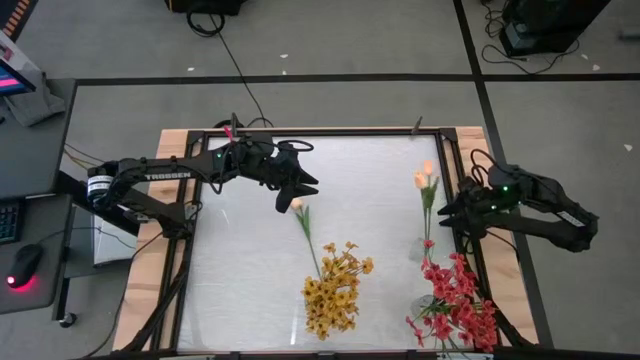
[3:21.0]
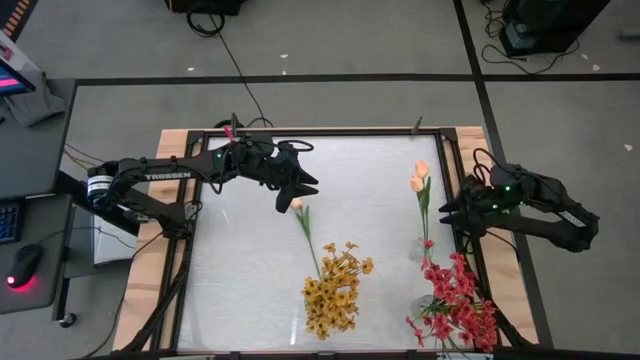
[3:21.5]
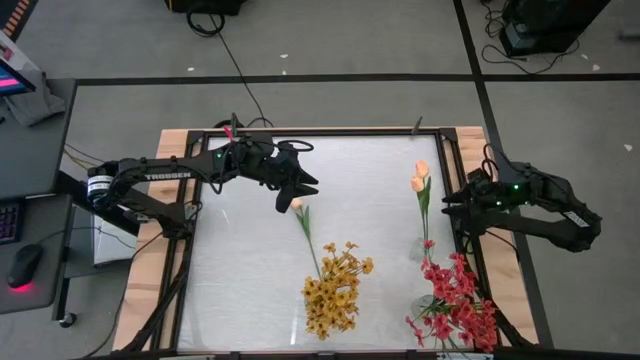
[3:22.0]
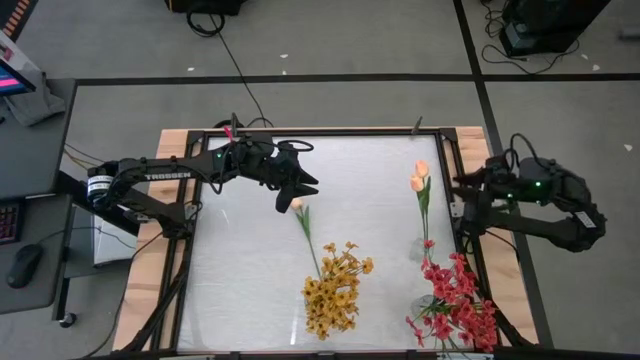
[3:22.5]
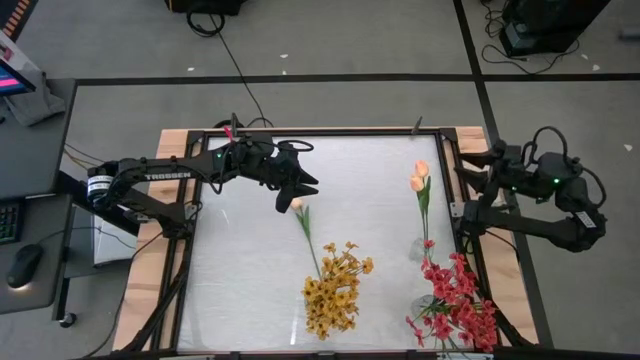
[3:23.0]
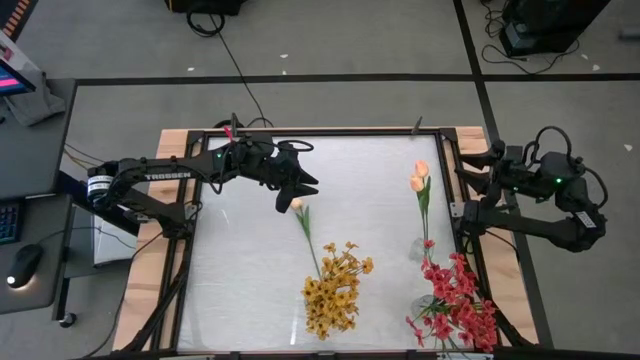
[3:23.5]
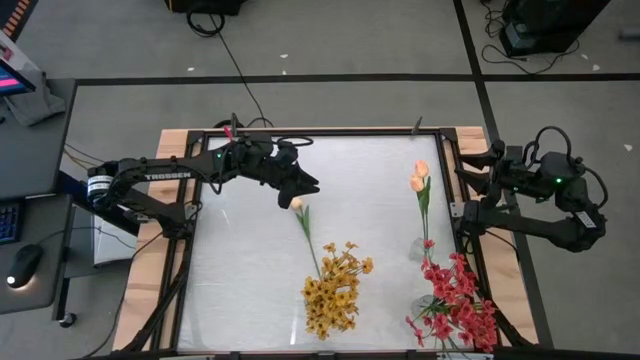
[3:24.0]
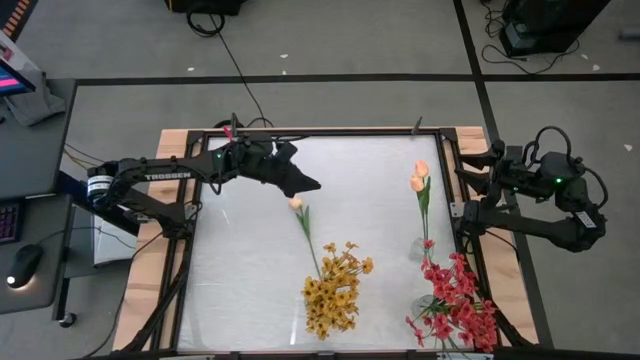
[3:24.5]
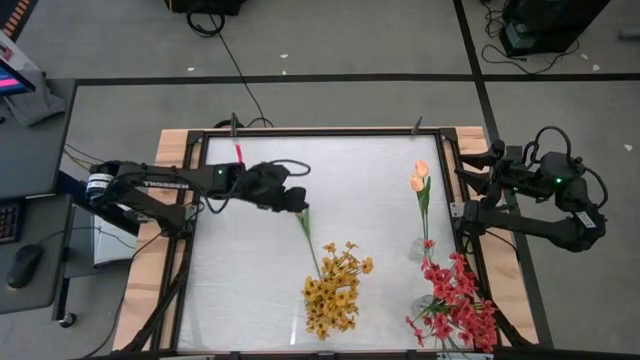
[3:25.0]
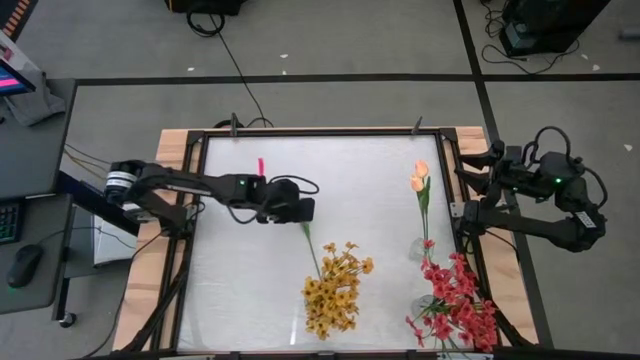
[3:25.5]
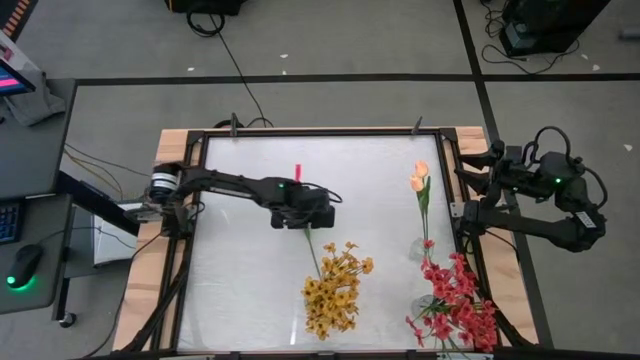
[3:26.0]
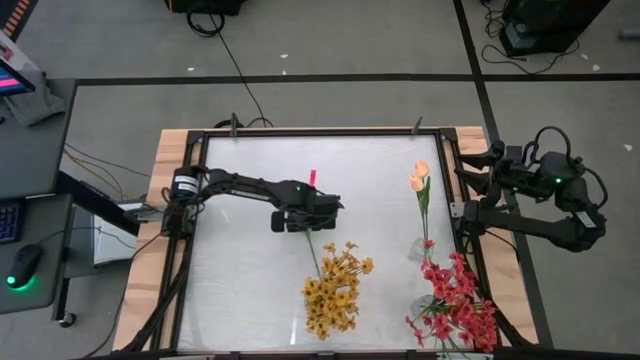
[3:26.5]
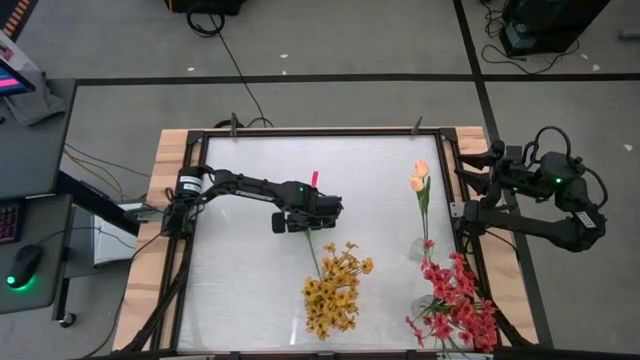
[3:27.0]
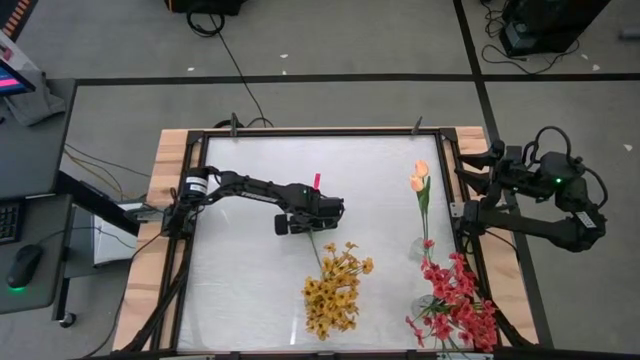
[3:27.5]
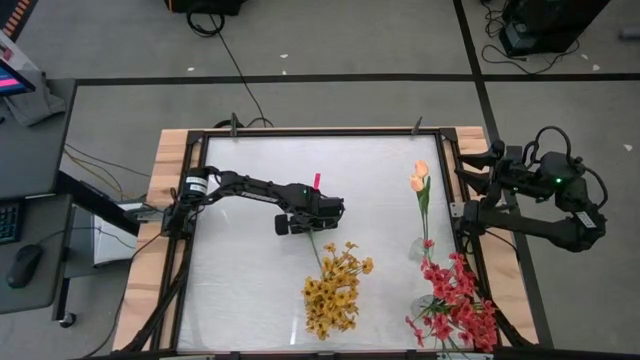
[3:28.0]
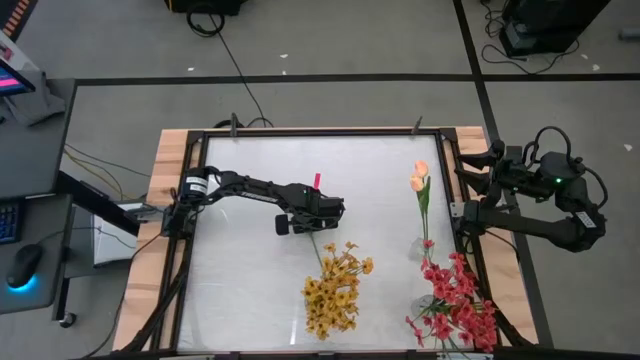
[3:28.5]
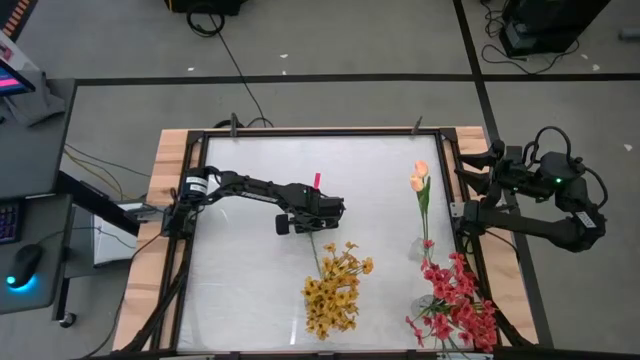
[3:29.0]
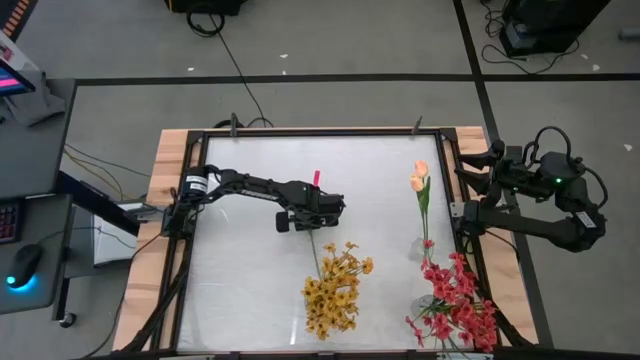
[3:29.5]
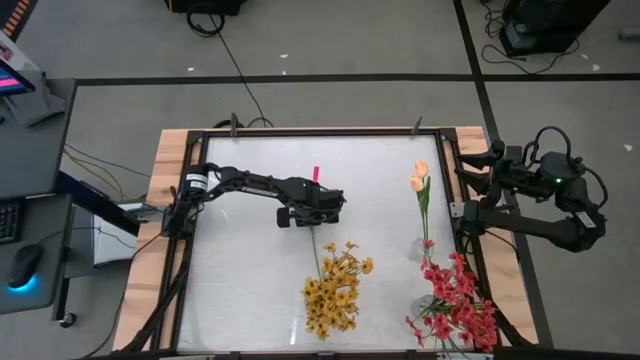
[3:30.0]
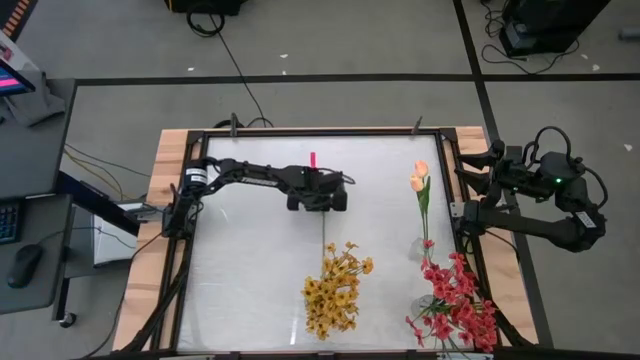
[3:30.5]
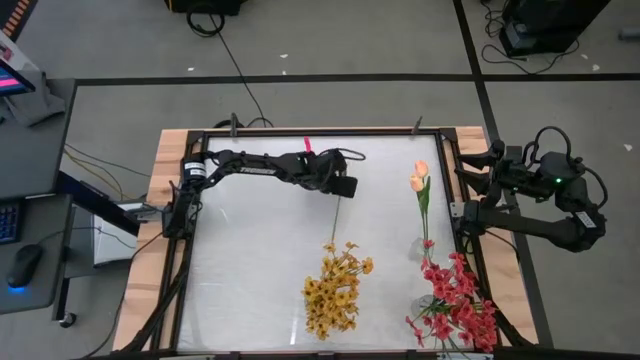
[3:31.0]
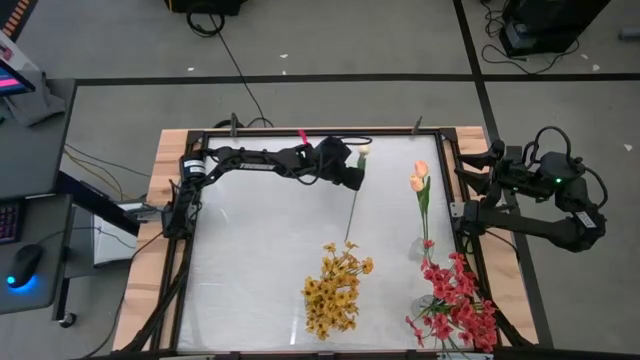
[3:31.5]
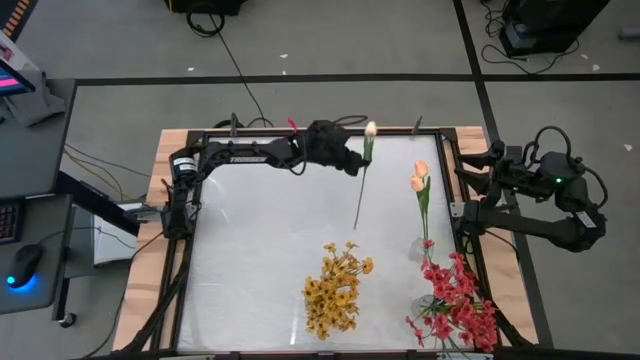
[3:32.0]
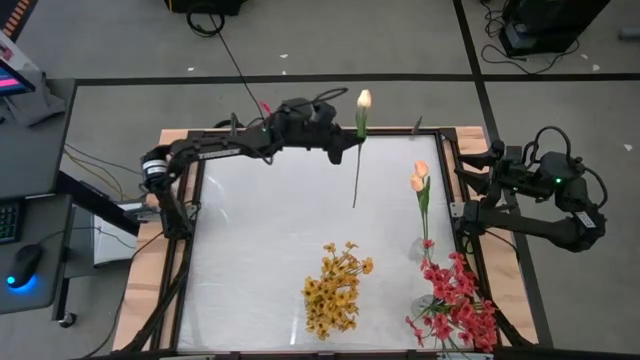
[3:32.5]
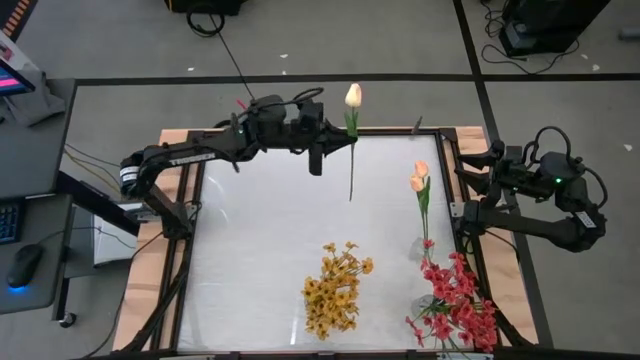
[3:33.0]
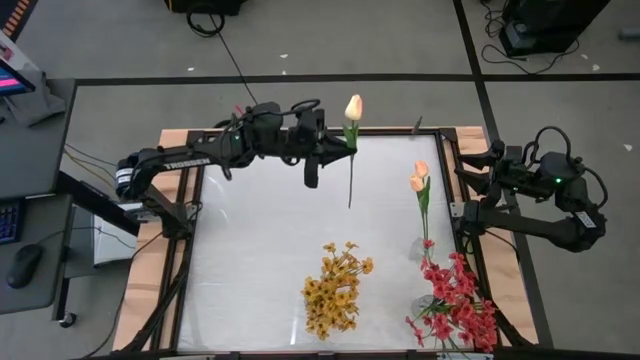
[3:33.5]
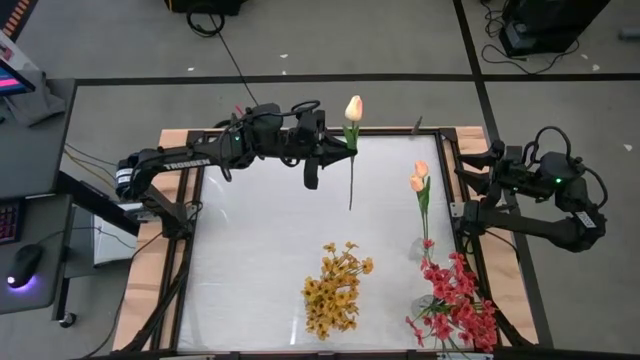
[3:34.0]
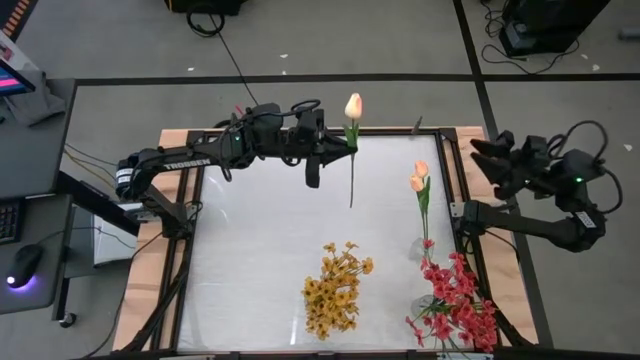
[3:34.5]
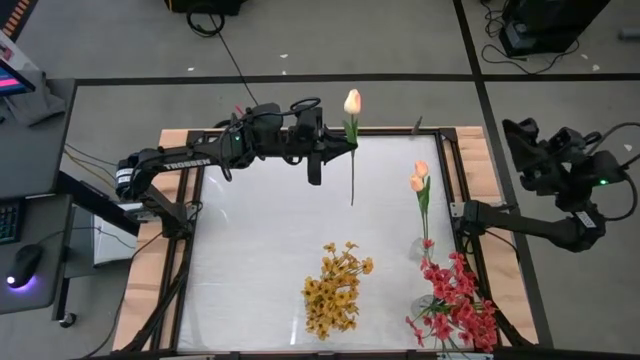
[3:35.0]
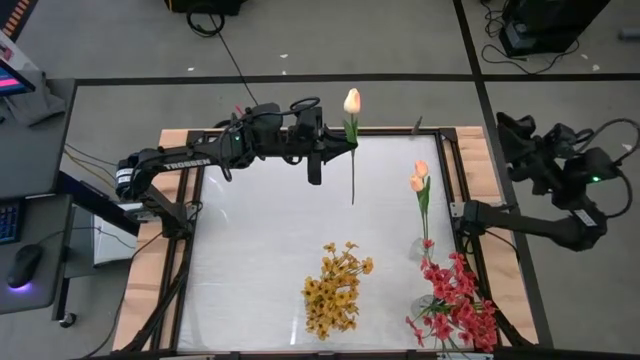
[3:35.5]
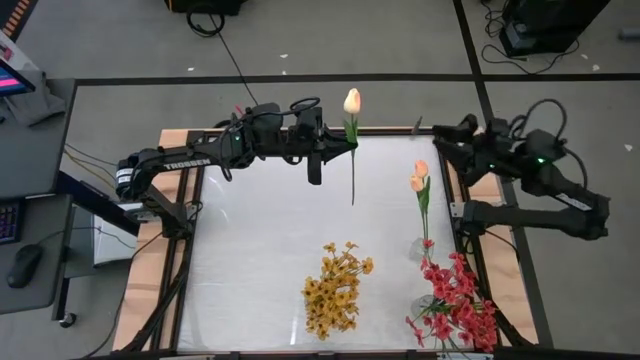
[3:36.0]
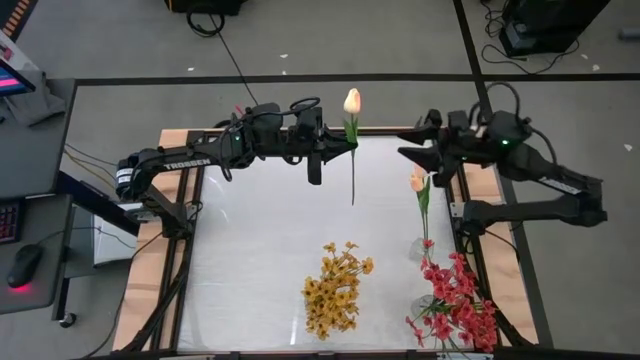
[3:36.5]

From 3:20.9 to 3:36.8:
Task: Sort flowers into vase by color
Put the light pink flower into the top transparent vase

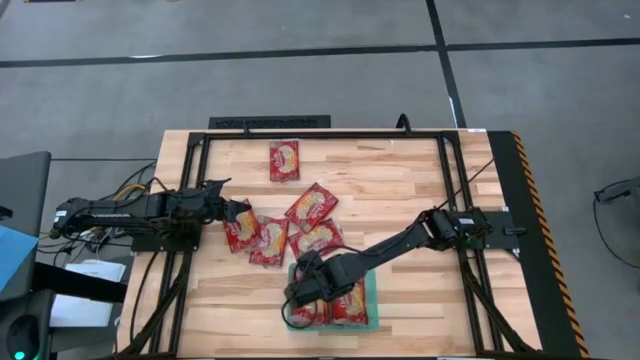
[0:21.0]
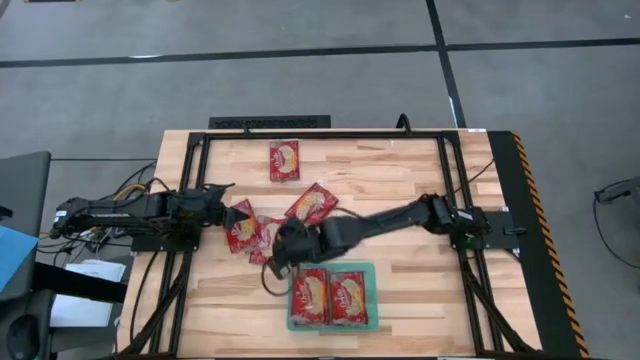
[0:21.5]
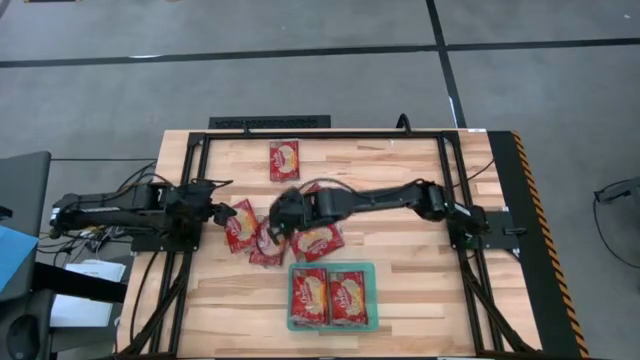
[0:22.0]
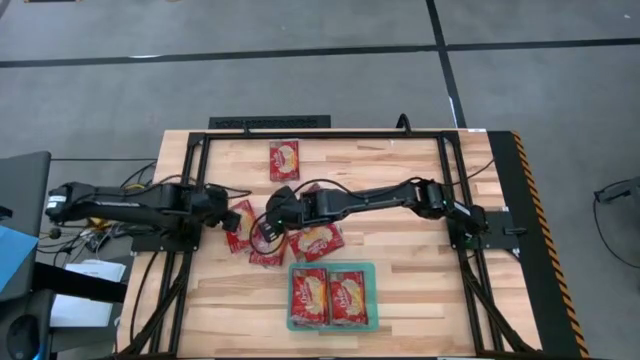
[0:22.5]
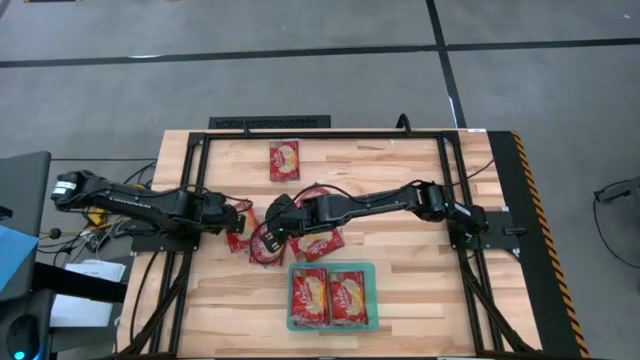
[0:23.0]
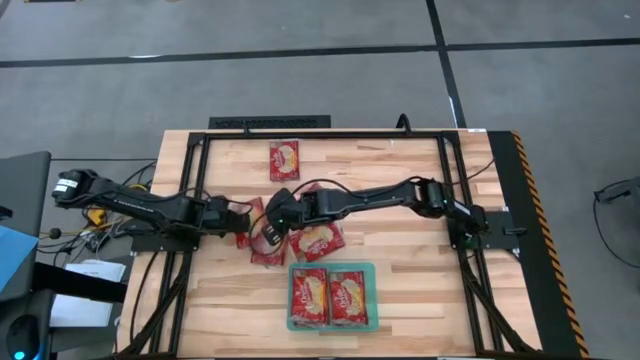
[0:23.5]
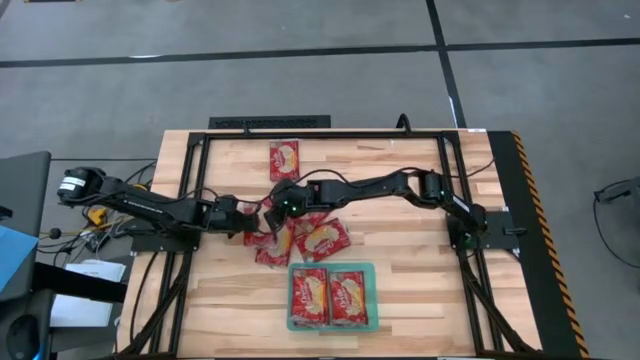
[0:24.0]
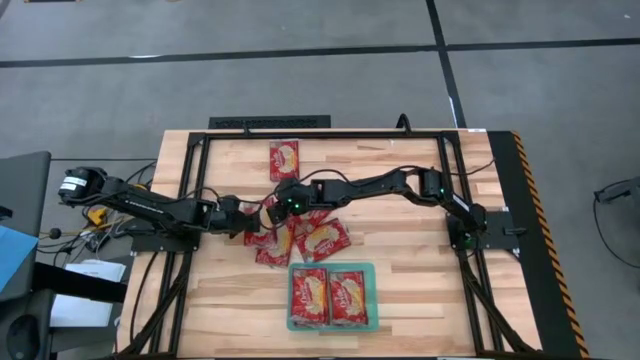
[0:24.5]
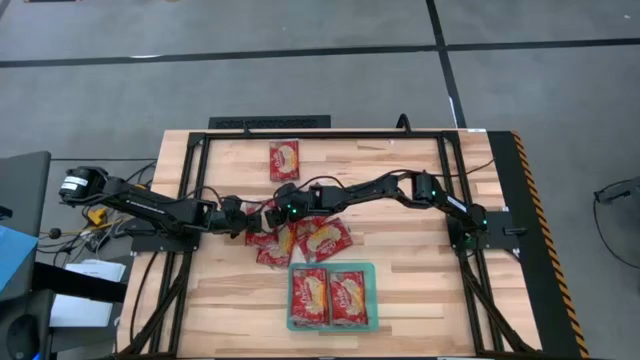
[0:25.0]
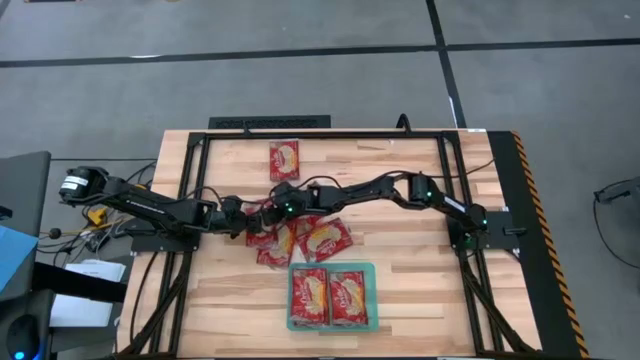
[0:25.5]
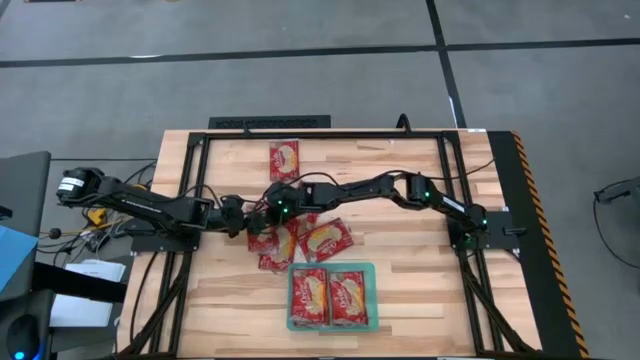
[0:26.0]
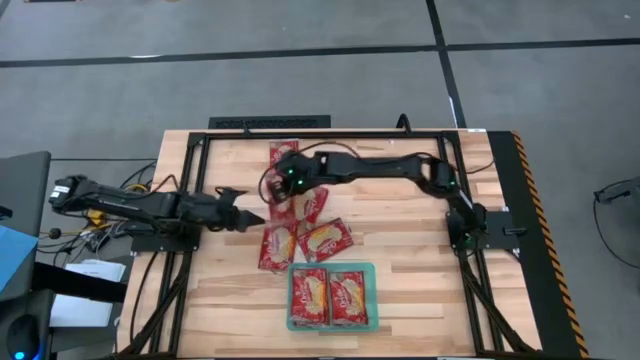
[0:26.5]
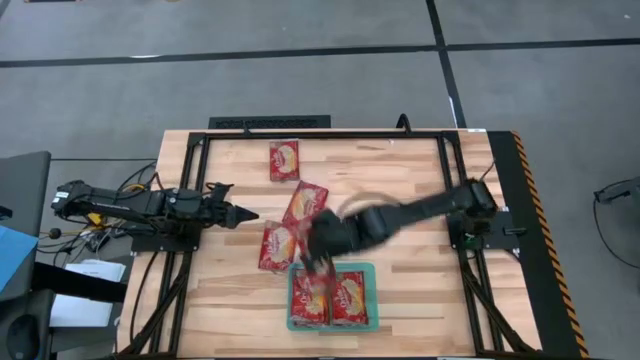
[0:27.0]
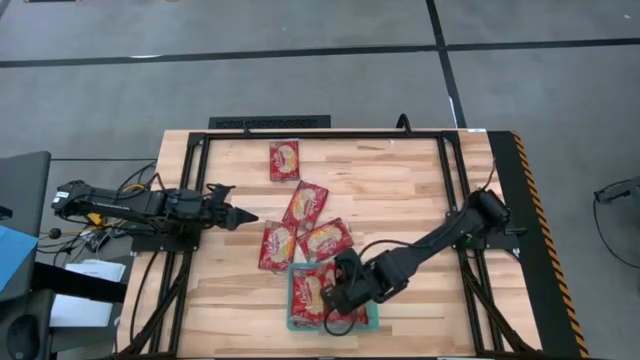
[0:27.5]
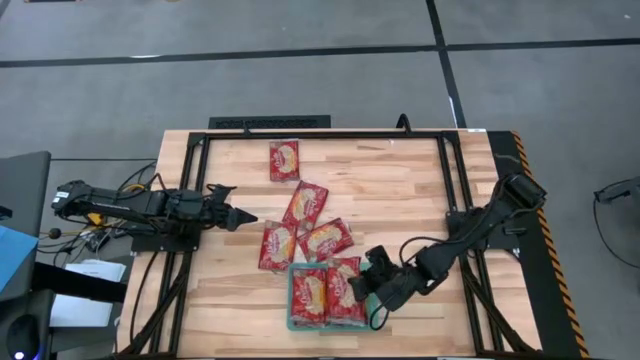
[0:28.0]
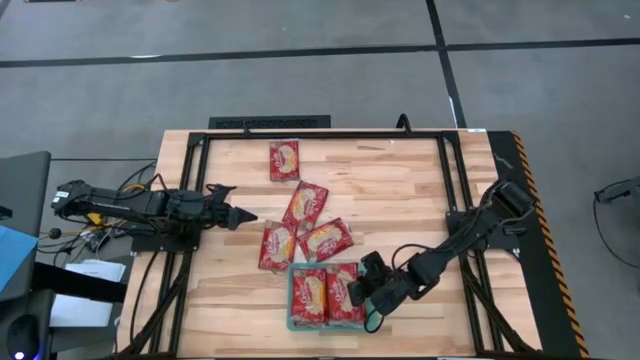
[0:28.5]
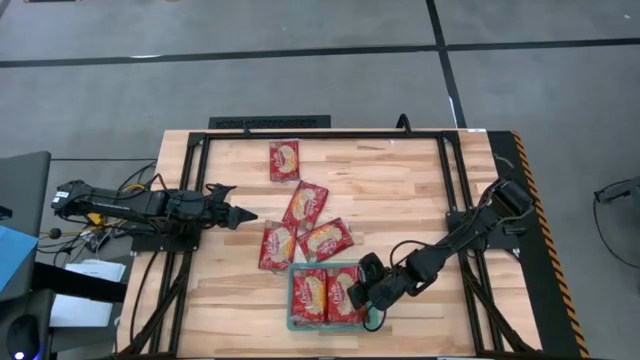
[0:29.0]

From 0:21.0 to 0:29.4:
Task: Sort popcorn bags into baskets
Put the red popcorn bag into the green bin
